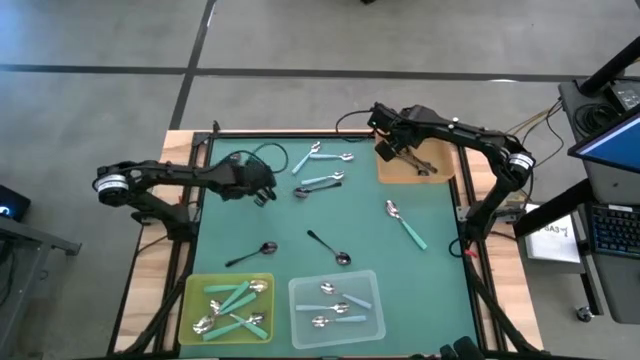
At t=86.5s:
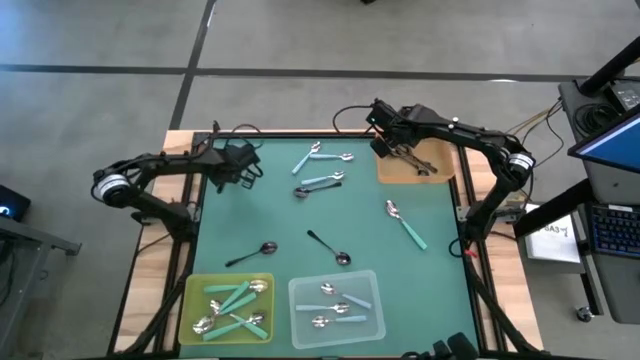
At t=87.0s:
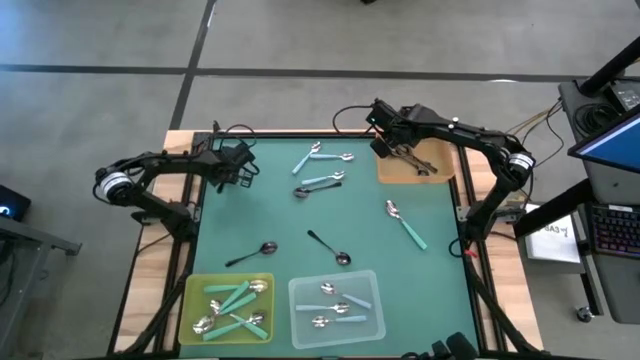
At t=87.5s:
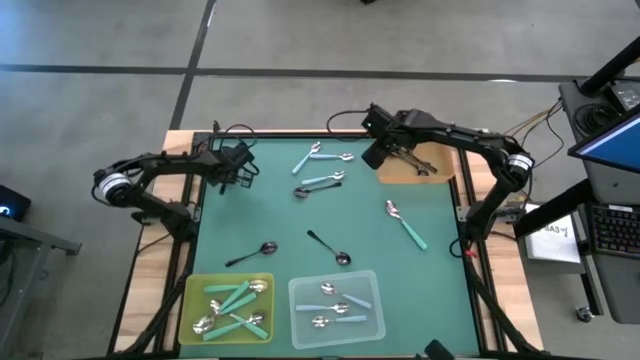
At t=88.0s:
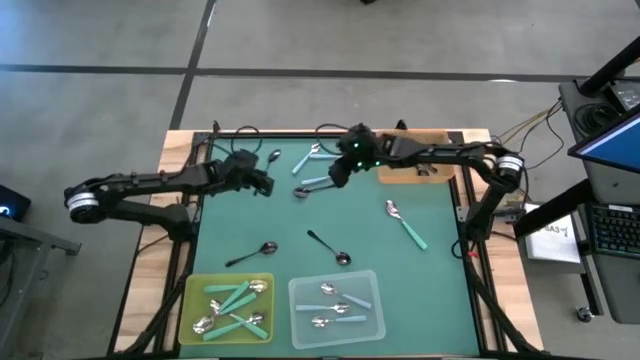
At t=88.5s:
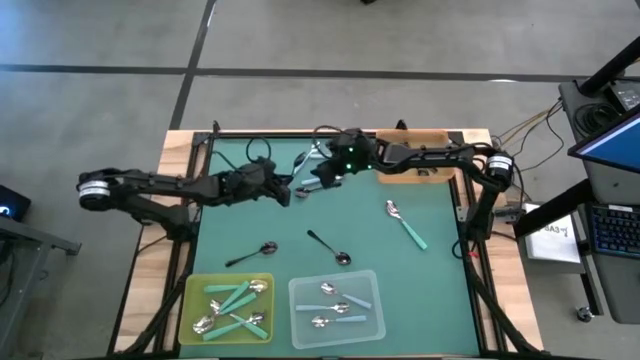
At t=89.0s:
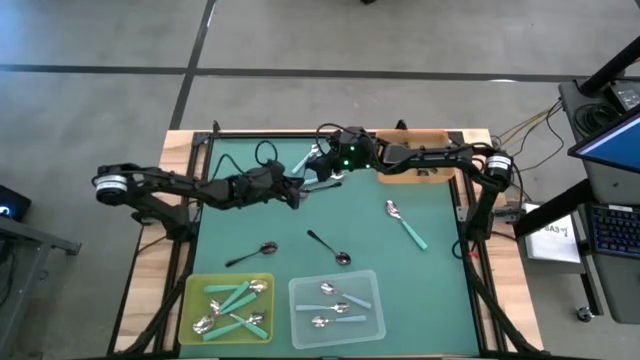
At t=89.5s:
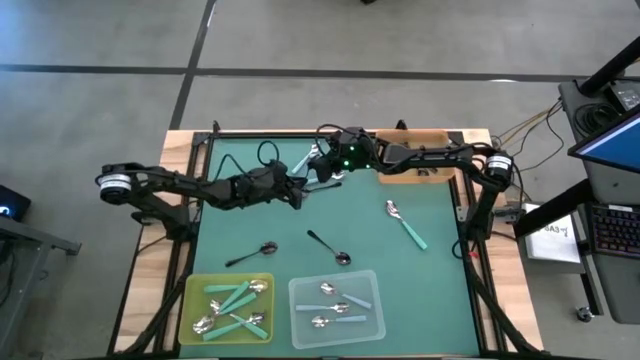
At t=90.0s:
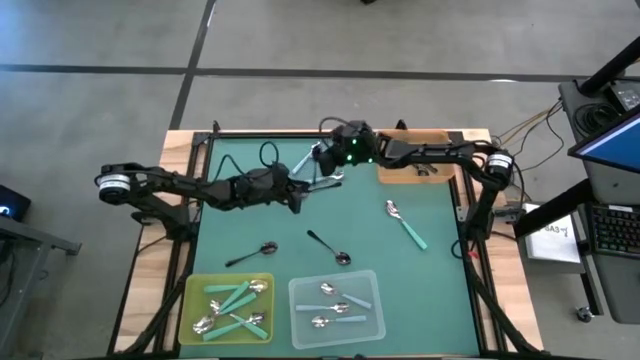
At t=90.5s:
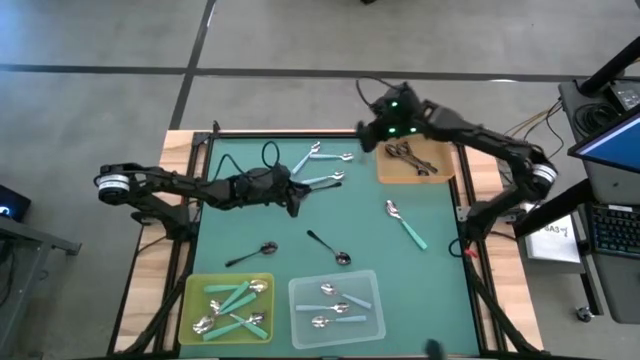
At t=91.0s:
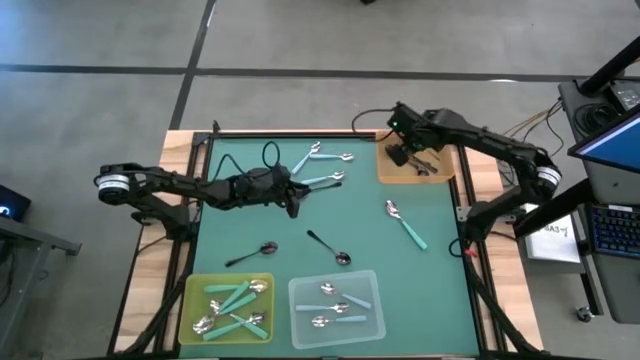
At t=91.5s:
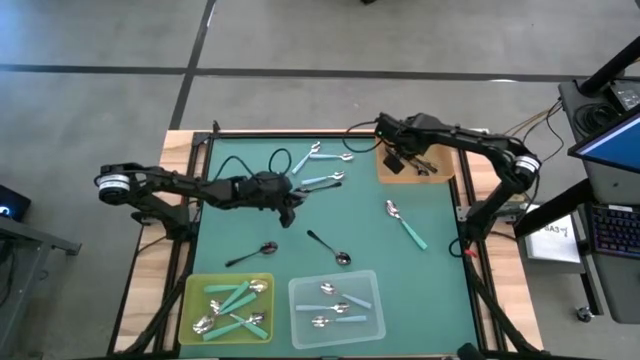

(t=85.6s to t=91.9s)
Task: Sort silverware by color (type)
Put the black spoon into the orange bin

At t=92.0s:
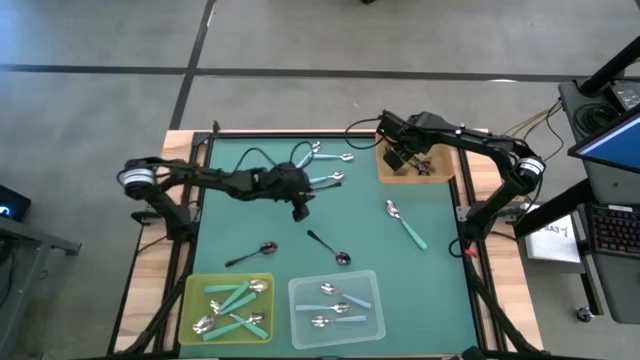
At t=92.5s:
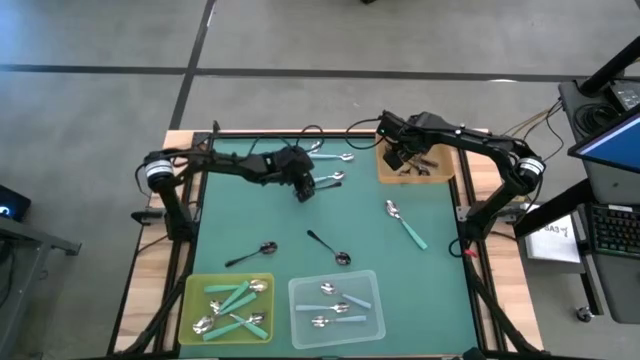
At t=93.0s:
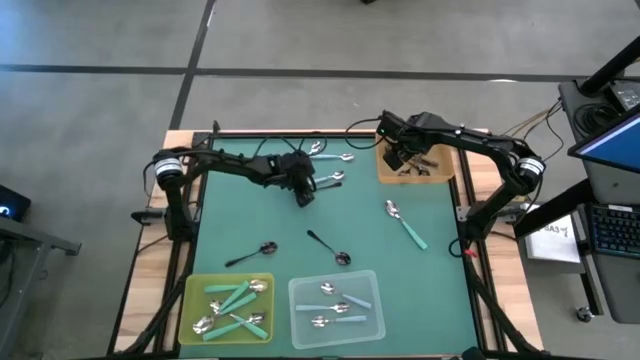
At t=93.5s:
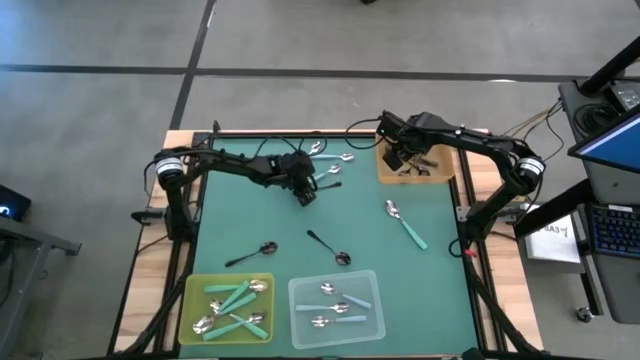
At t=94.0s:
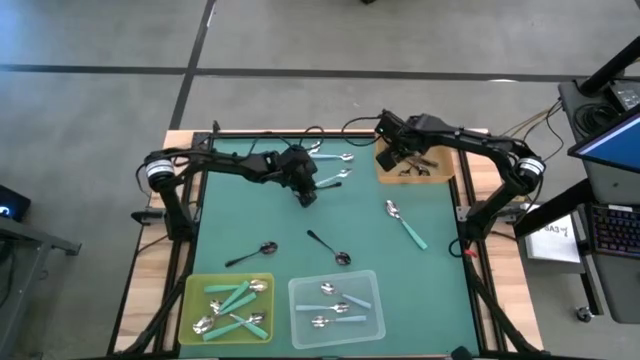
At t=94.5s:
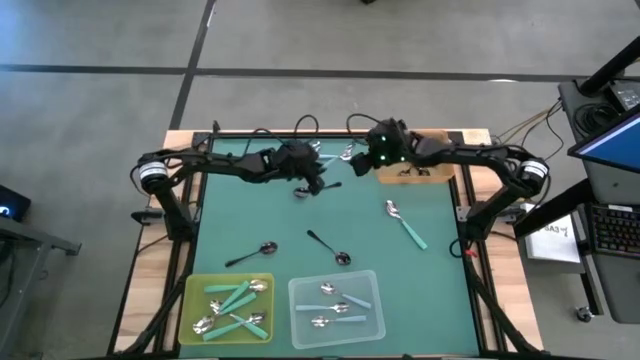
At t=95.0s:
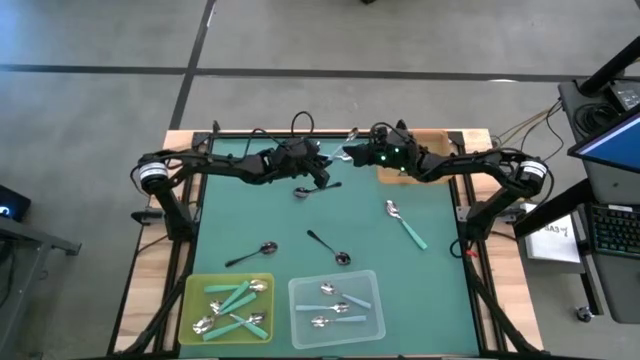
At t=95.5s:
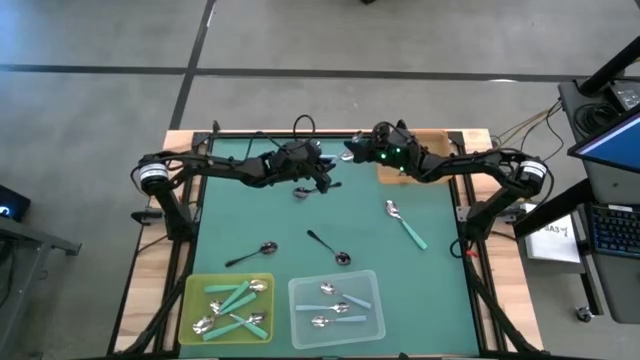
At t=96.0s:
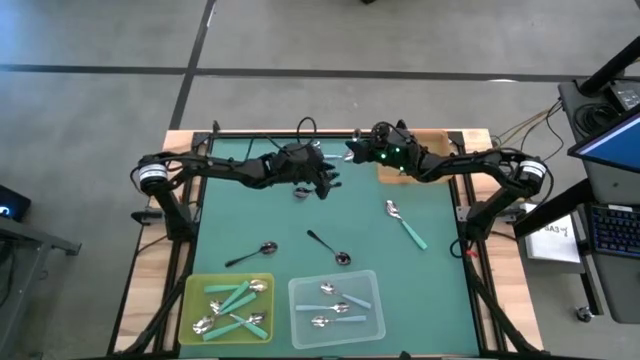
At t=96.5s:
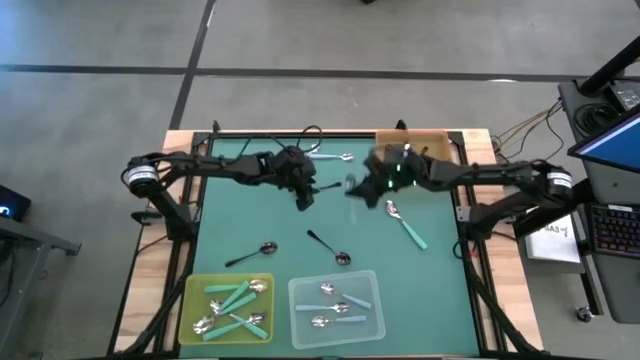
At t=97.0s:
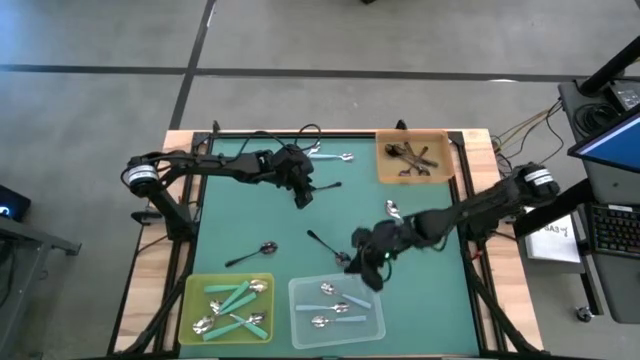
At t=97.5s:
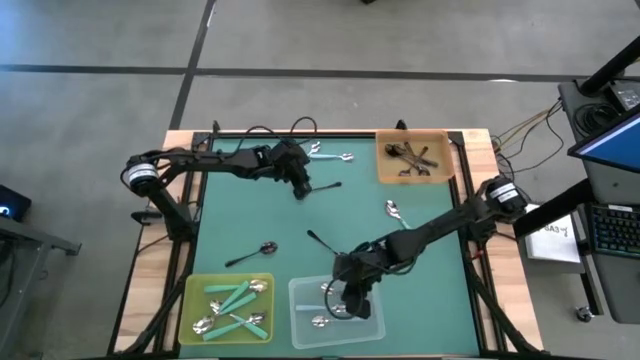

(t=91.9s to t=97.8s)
Put the blue spoon into the transparent bin

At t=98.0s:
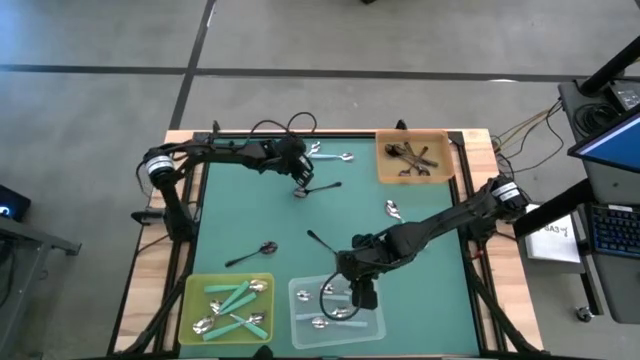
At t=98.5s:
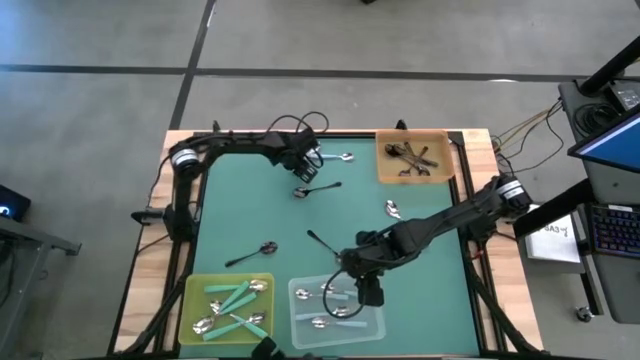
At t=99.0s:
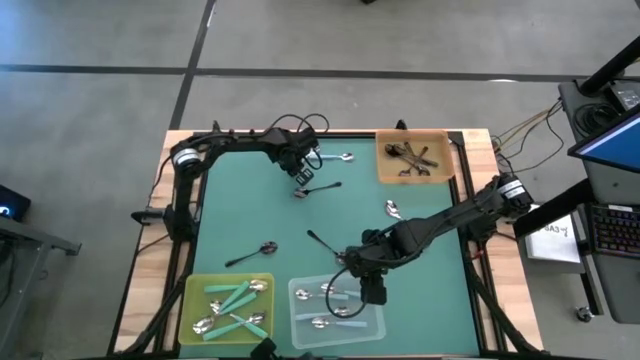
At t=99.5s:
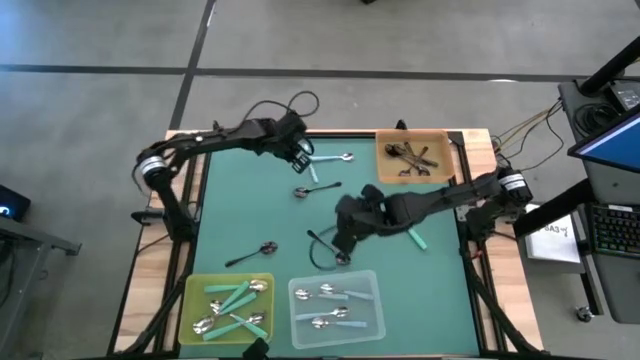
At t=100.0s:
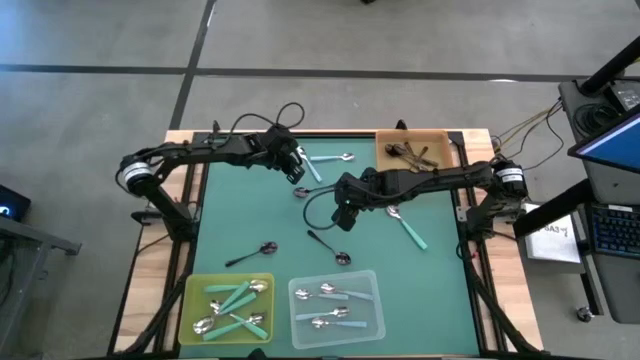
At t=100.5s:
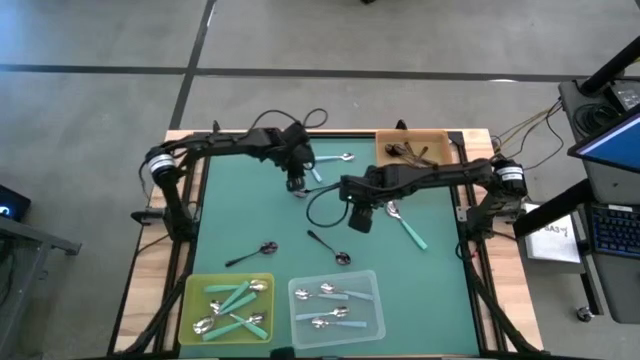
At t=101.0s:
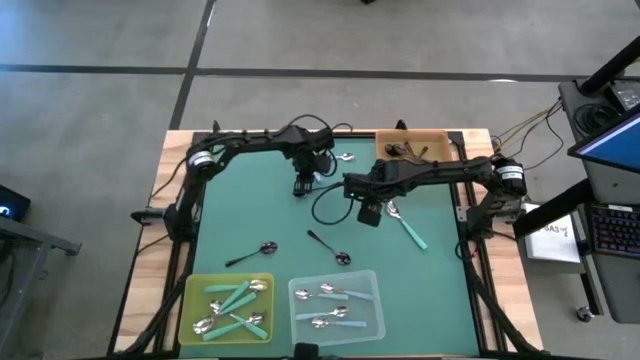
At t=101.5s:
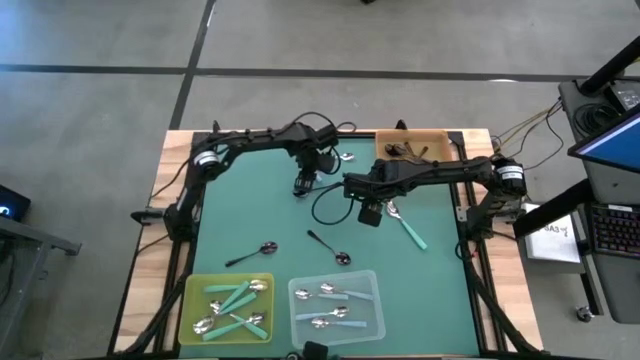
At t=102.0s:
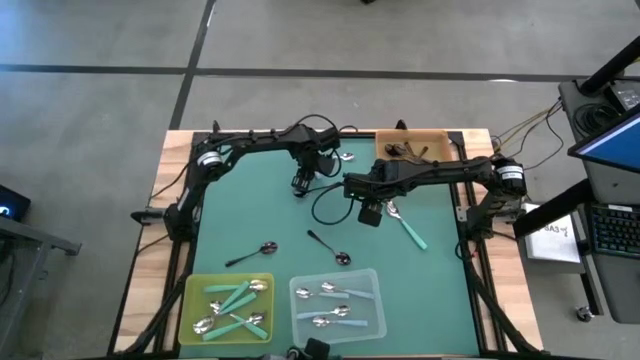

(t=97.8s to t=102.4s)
Put the blue spoon into the transparent bin

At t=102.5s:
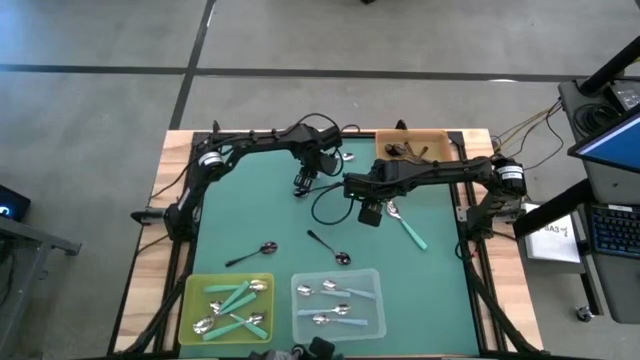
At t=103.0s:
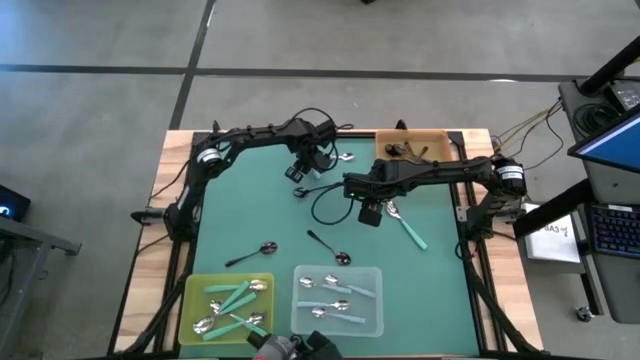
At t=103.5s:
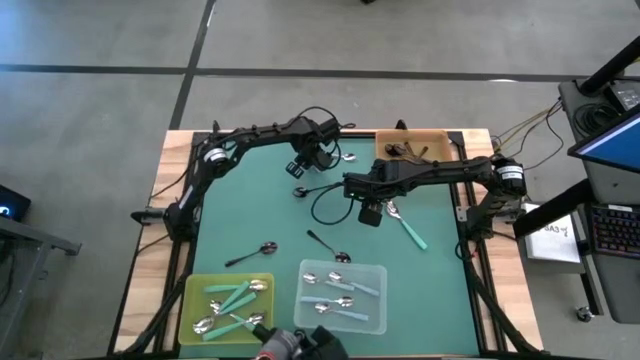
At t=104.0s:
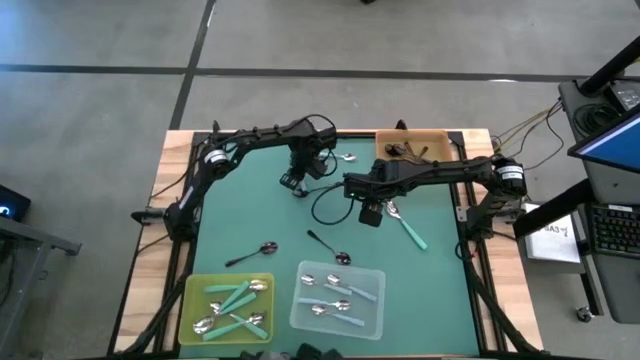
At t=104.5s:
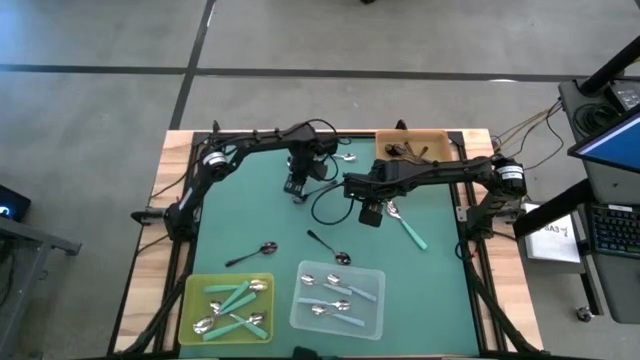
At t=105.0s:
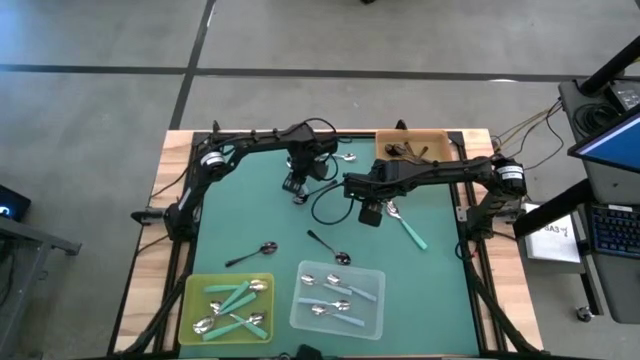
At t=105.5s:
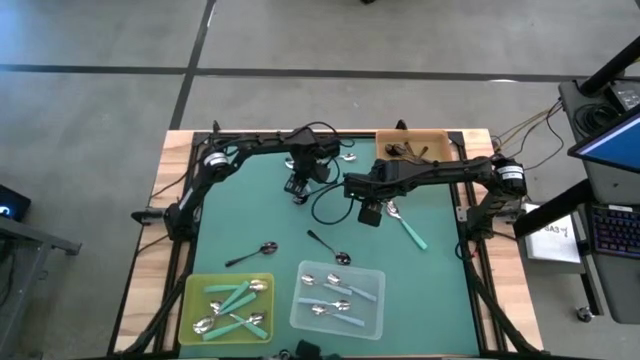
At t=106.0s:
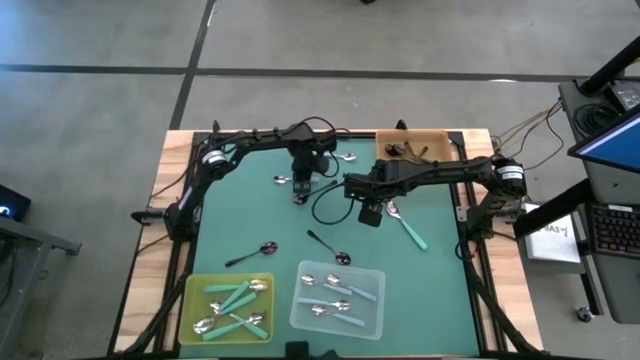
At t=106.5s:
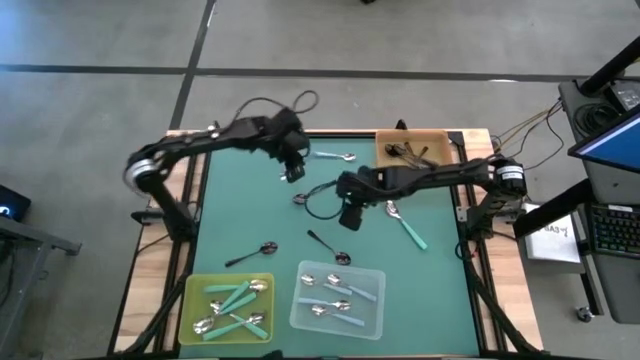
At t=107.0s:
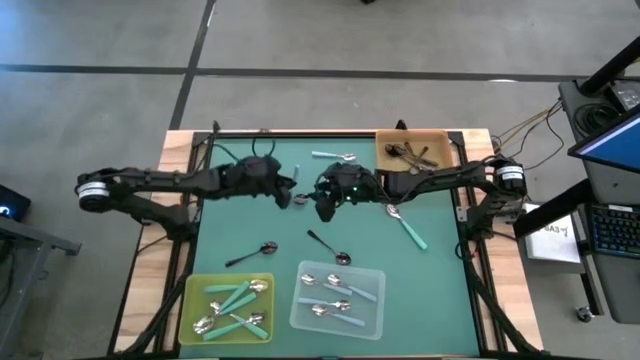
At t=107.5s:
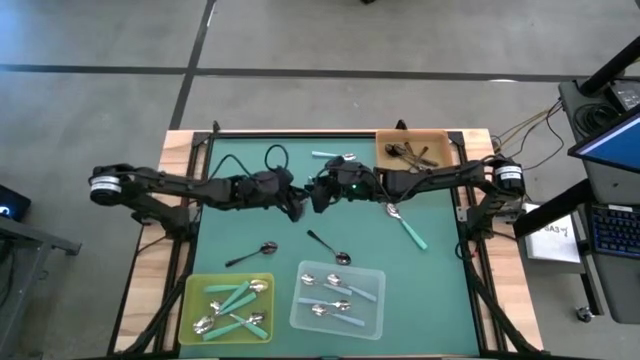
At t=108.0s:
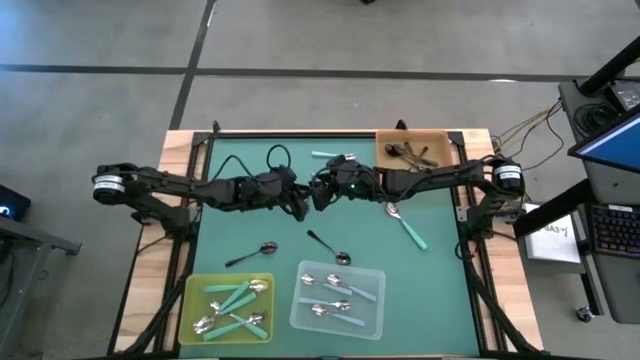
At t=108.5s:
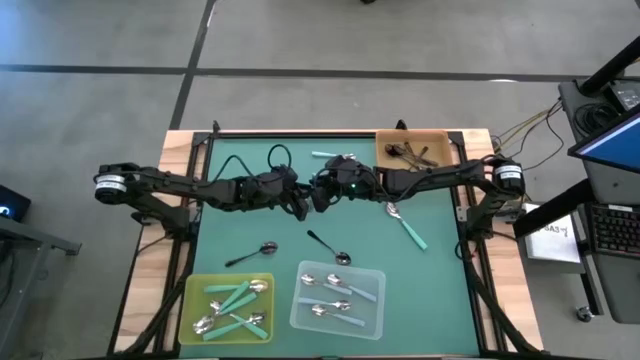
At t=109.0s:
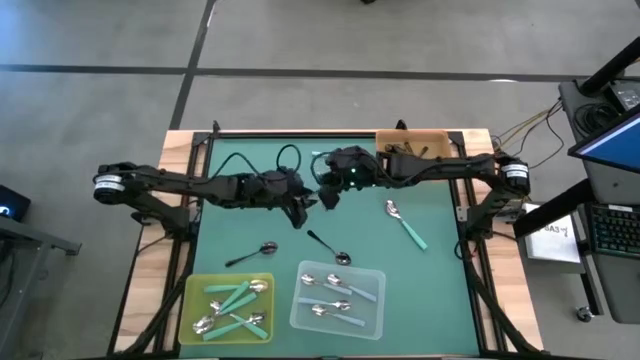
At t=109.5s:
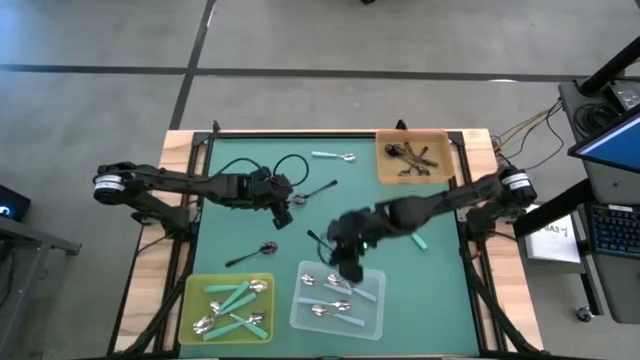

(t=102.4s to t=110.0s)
Put the blue spoon into the transparent bin
